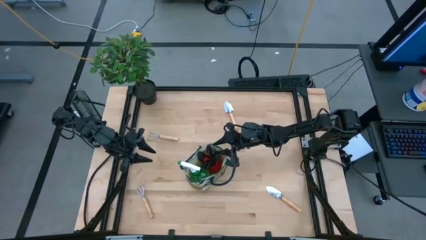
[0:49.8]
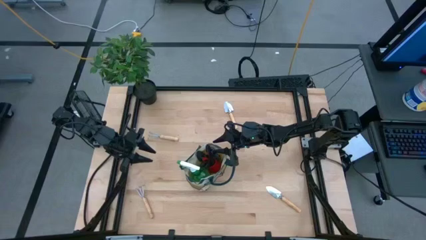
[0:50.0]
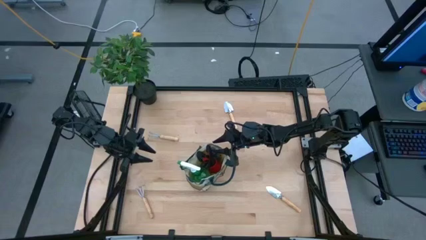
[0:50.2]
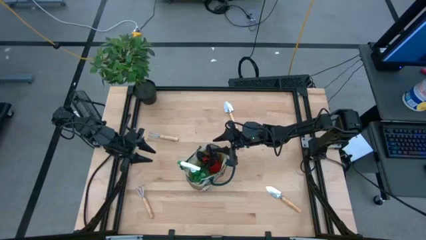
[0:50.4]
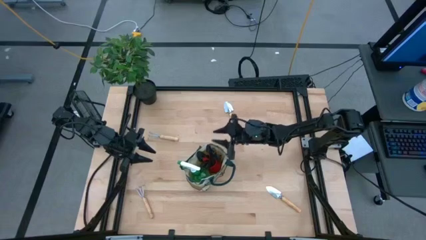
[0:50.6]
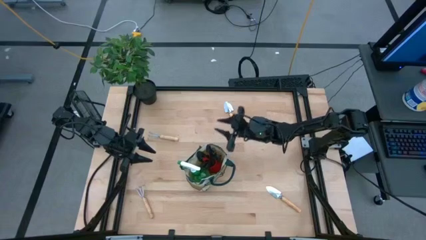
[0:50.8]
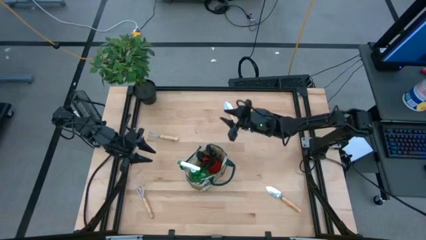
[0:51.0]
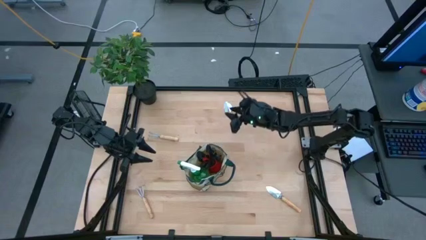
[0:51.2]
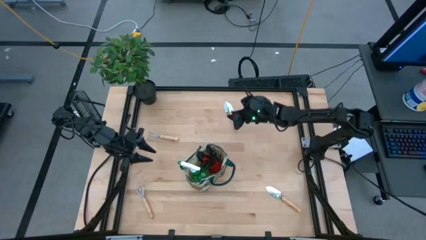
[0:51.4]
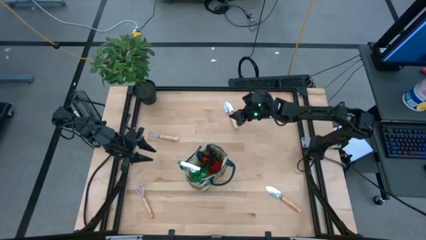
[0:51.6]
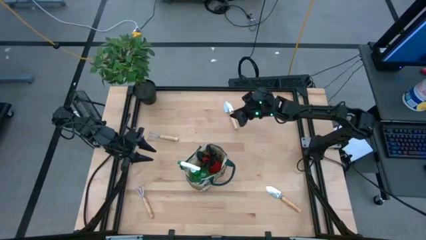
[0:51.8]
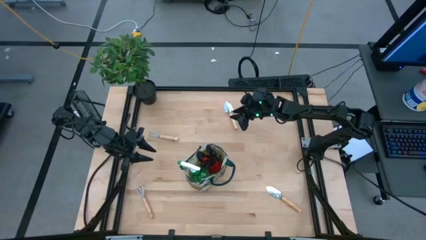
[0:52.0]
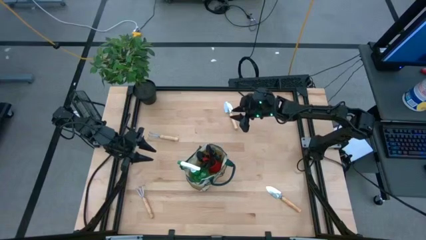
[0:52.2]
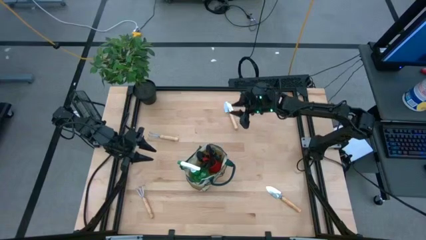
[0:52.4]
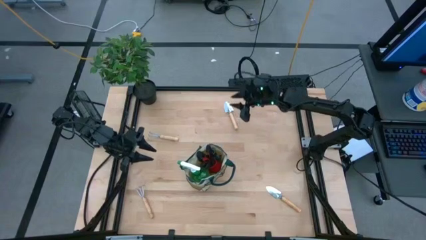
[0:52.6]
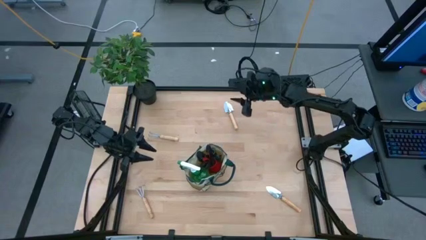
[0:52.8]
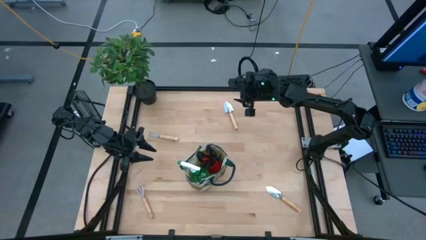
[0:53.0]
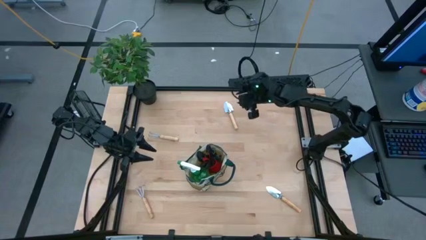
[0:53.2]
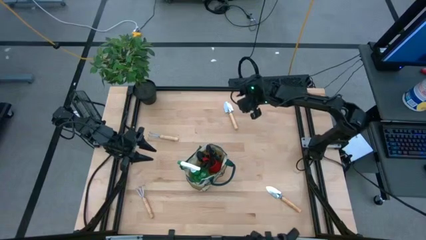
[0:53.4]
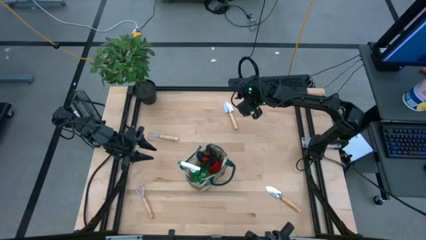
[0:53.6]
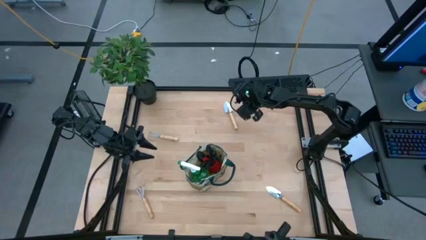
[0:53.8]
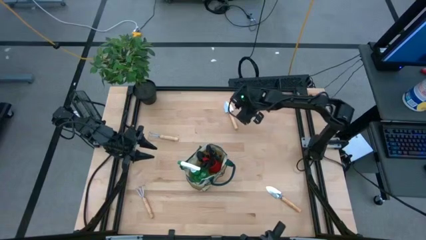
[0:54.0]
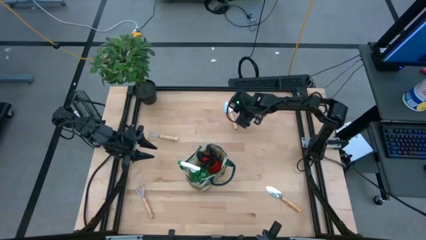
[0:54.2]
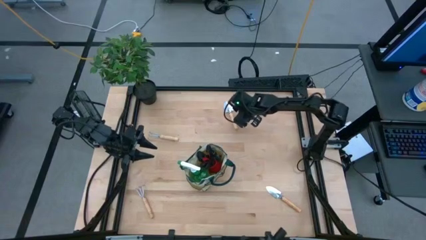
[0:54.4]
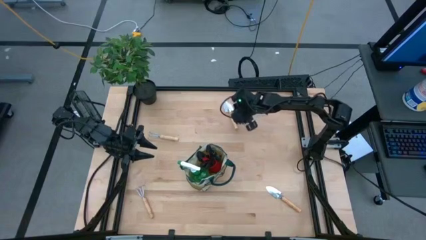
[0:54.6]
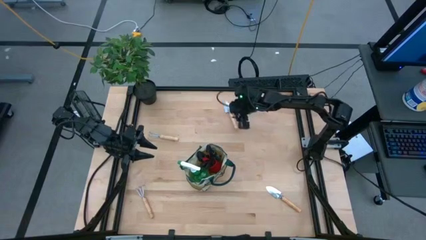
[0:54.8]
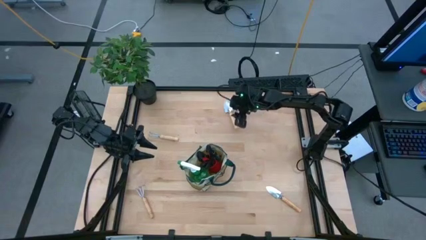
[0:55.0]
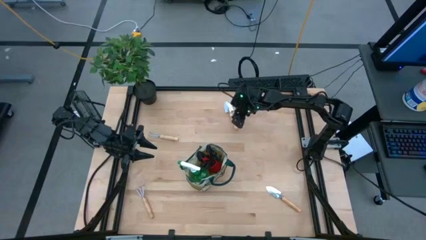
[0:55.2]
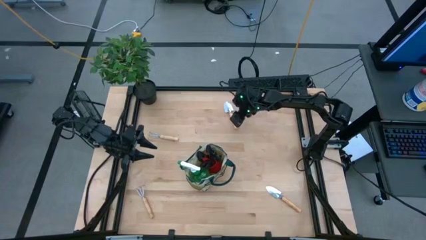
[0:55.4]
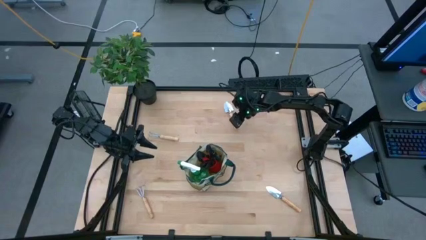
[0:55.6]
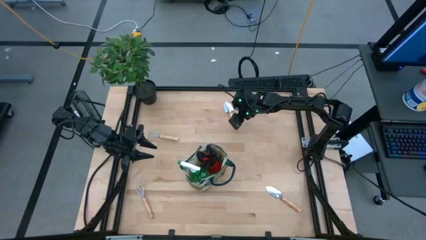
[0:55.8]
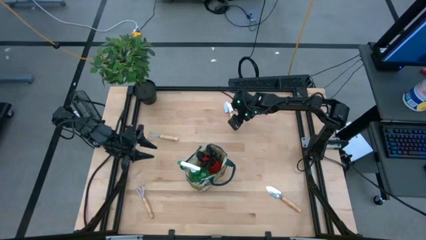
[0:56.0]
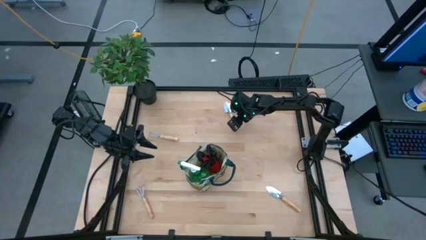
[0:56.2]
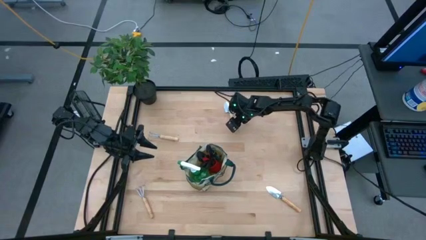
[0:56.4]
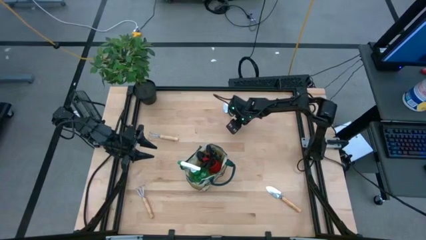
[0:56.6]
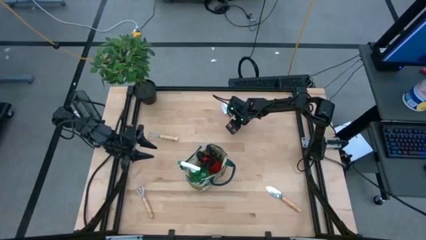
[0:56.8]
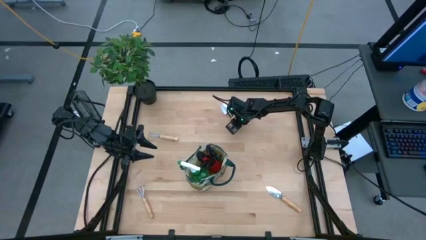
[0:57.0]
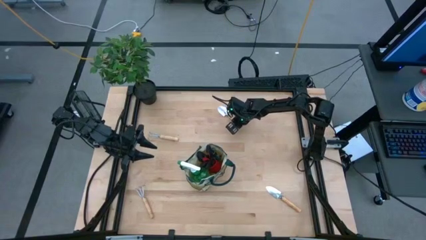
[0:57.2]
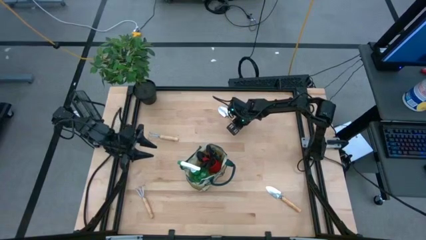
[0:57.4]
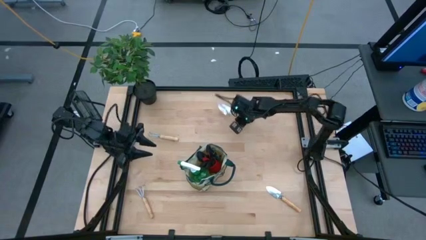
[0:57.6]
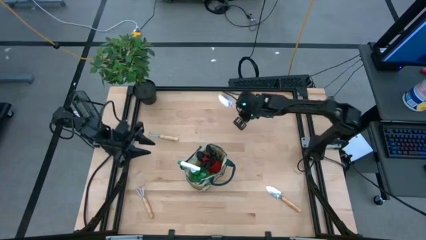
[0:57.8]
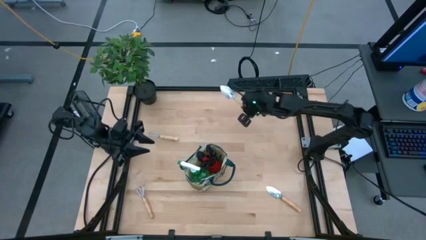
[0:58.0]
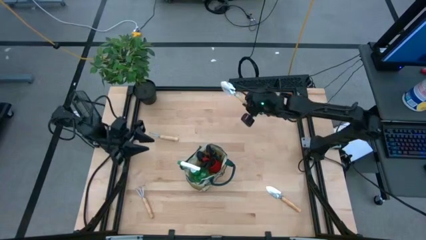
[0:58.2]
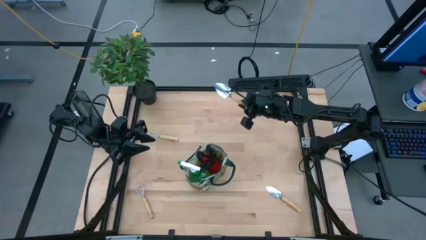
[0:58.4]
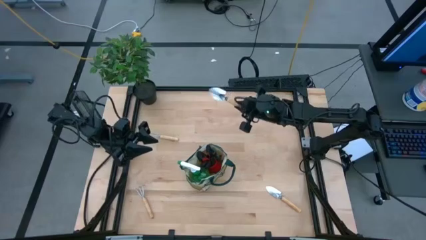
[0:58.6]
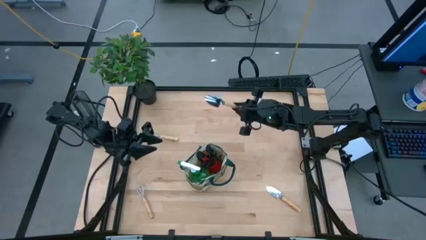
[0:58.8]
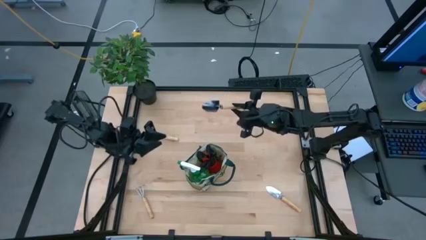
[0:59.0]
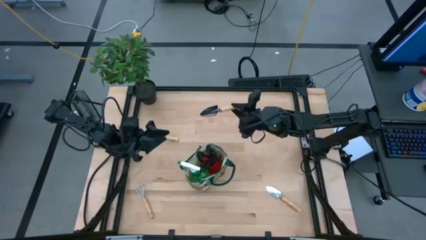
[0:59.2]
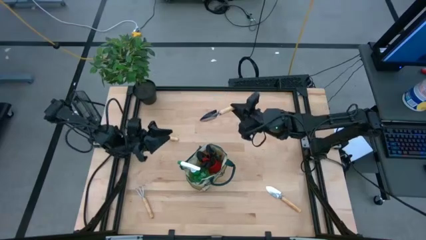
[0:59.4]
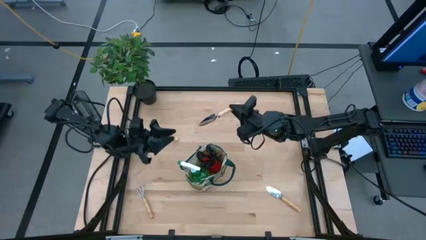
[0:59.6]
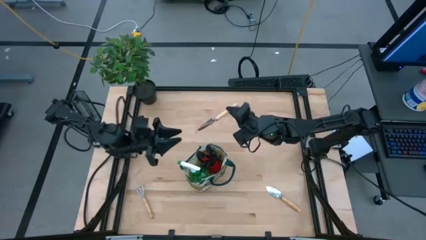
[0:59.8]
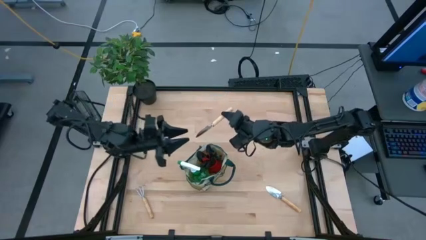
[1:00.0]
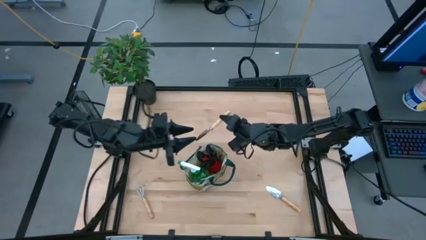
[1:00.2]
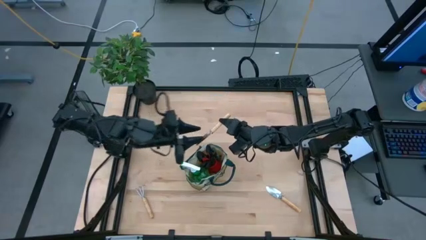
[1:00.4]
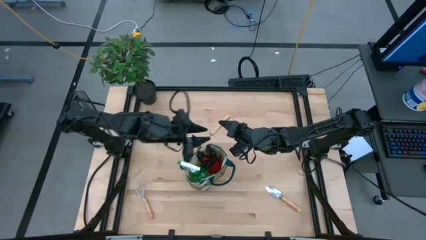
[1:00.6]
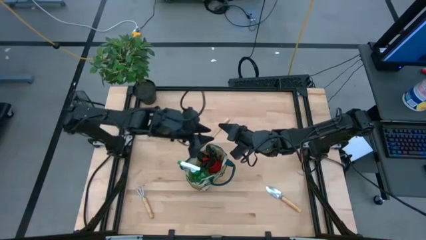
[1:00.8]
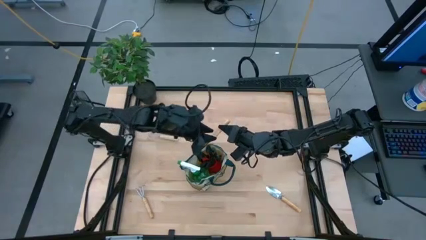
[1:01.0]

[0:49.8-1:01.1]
Task: Pick & Place Garden tools in Gardening bag
Put the top trowel into the gardening bag

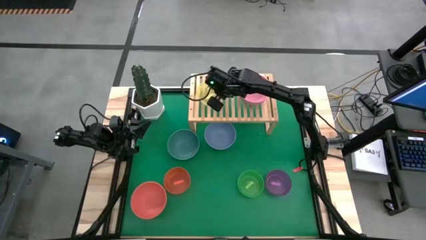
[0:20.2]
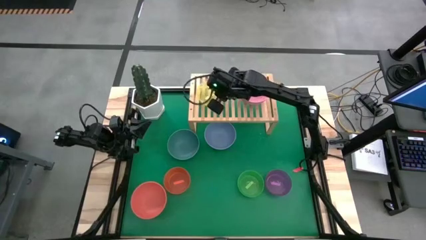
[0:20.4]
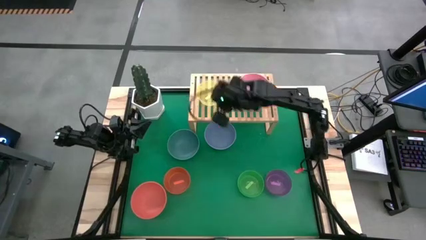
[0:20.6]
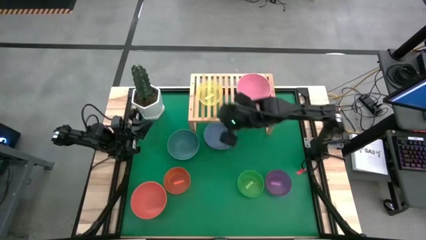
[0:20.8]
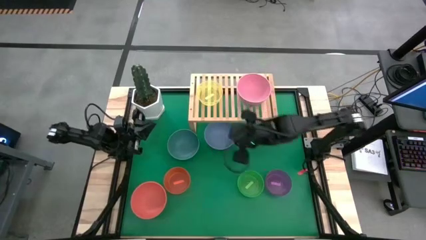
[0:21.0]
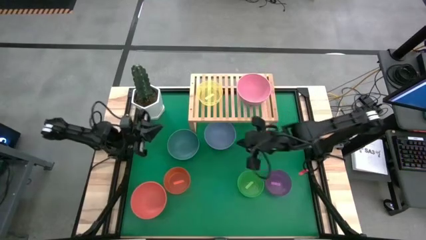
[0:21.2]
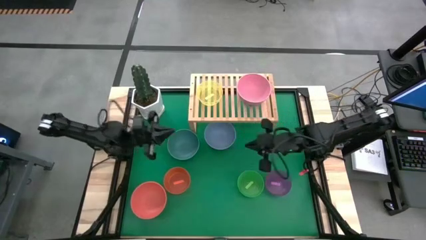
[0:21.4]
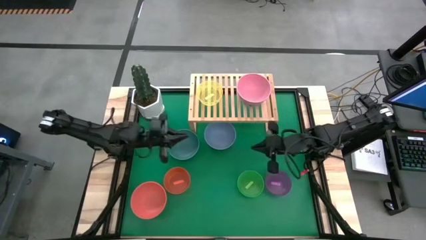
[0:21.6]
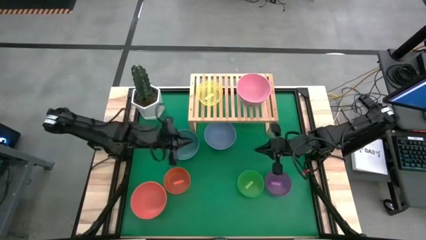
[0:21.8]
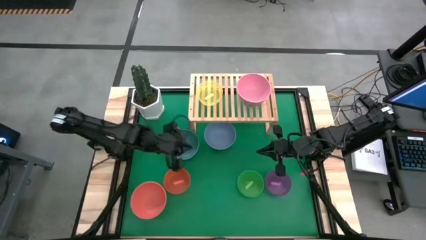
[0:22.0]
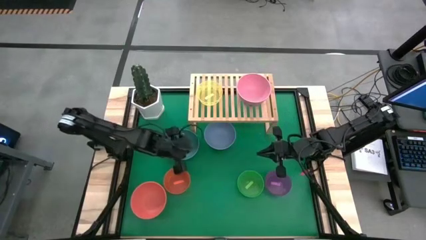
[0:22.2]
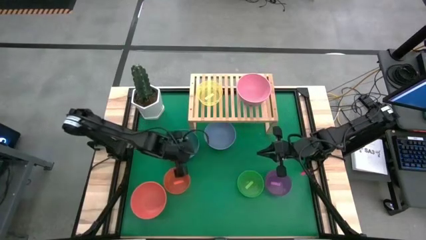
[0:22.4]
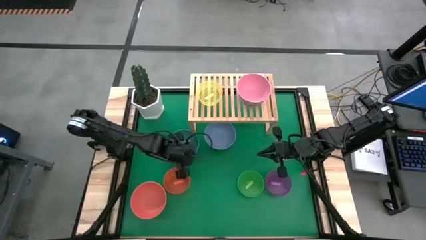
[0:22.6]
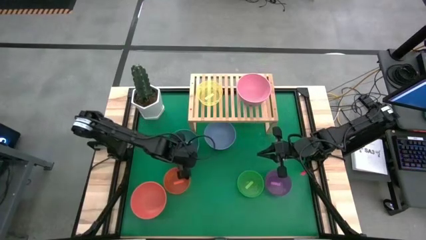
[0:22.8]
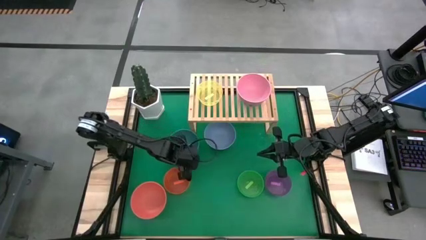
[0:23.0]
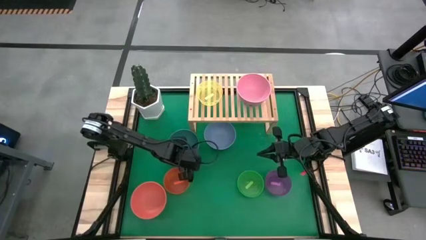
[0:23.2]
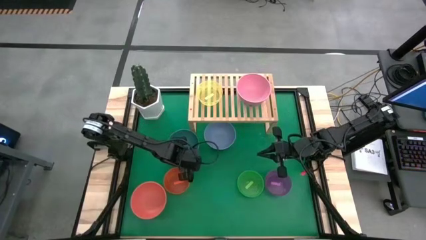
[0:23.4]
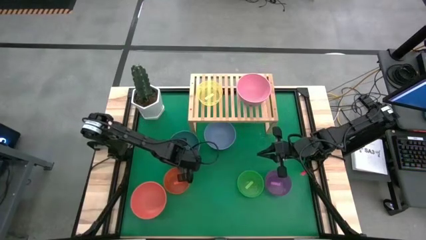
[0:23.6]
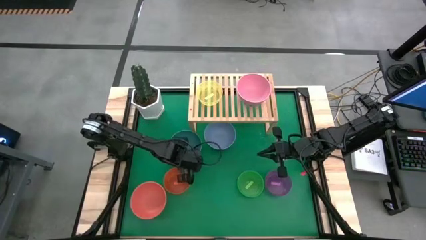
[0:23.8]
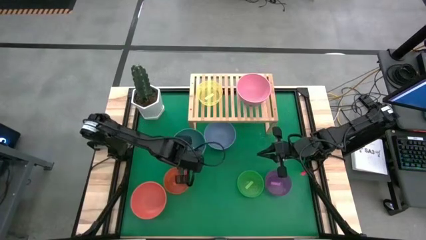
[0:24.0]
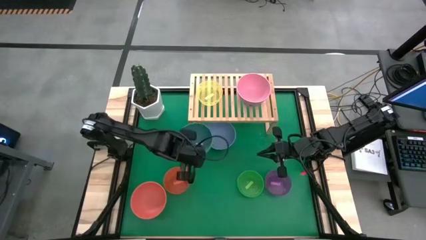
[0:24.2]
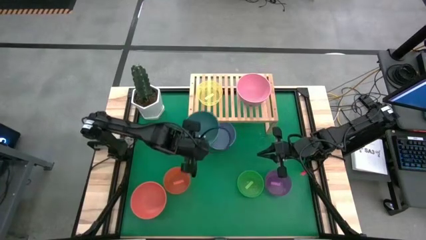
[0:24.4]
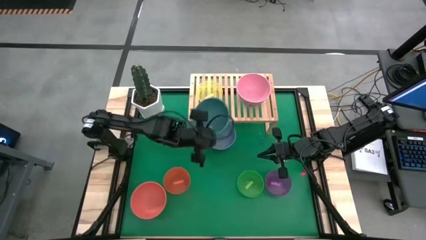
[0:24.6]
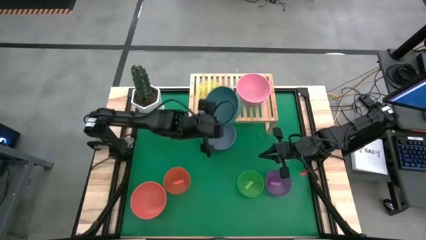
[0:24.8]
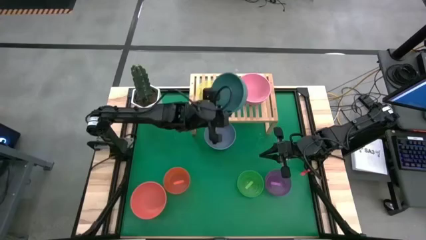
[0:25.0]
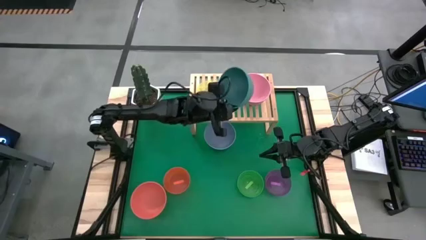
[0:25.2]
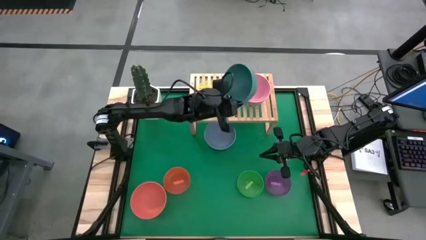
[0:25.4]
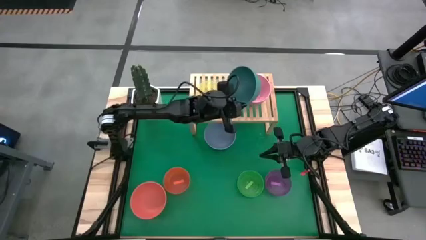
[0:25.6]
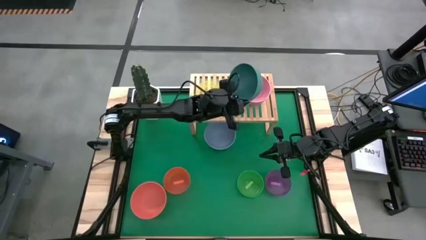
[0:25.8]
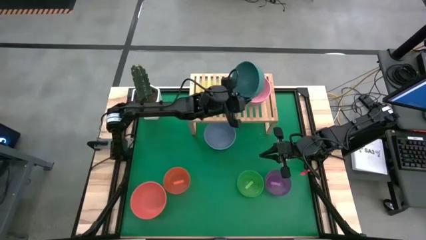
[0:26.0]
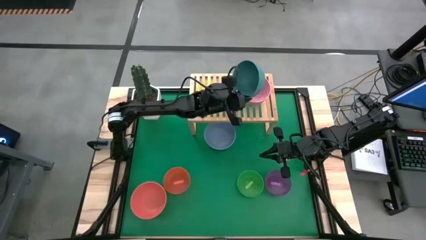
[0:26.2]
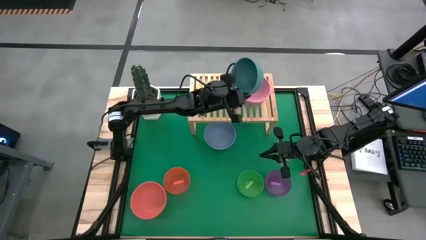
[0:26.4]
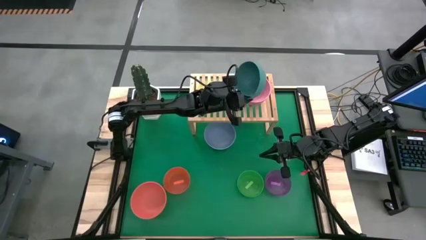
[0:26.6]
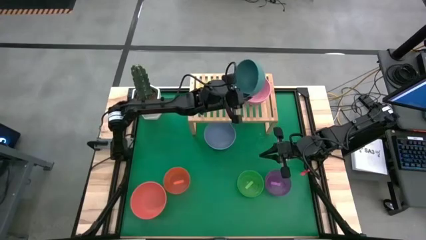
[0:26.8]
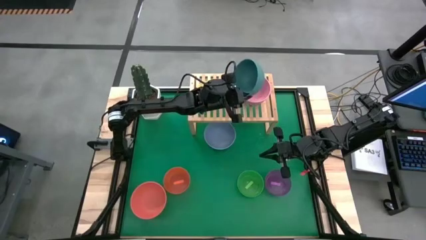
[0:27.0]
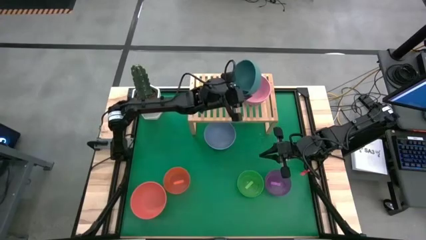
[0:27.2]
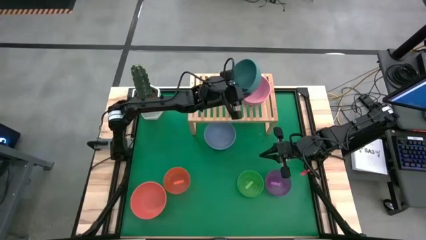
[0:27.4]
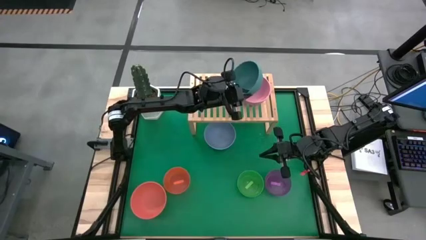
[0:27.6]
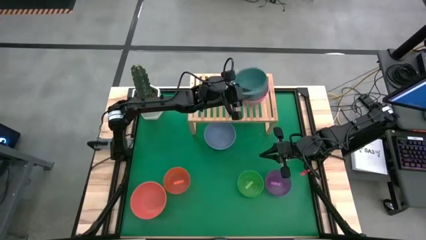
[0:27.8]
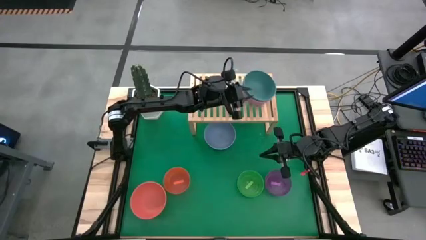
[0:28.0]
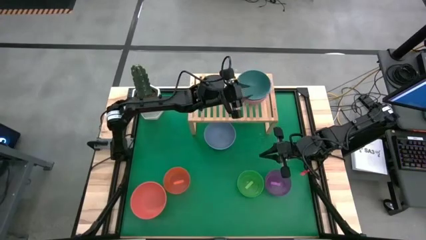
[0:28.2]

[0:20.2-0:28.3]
Task: Place and stack bowls onto a shelf
Stack the dark green bowl on top of the pink bowl on the shelf
